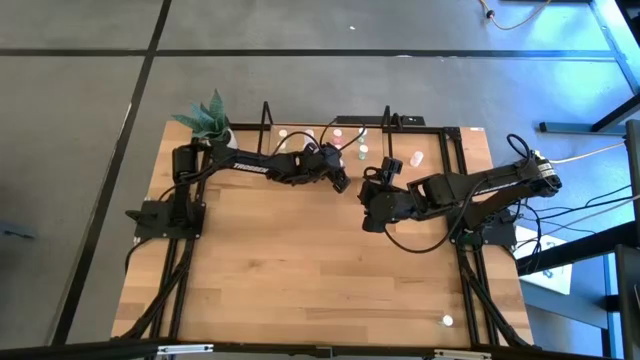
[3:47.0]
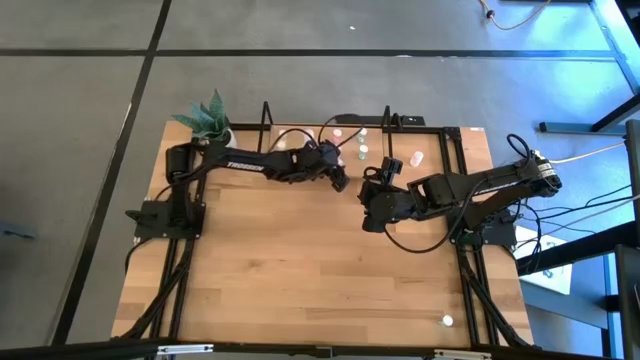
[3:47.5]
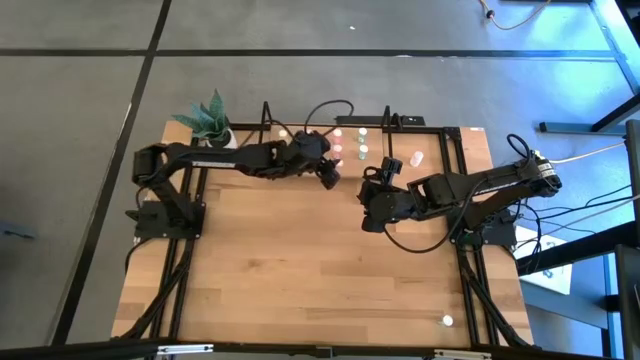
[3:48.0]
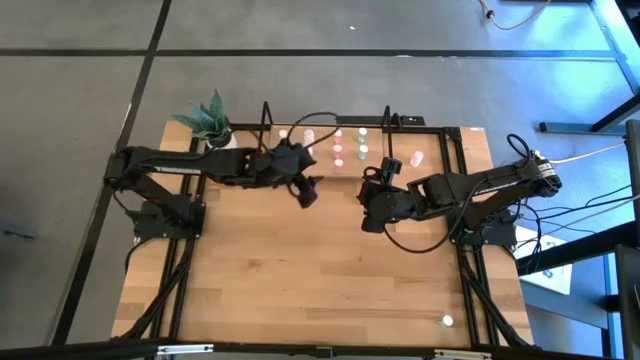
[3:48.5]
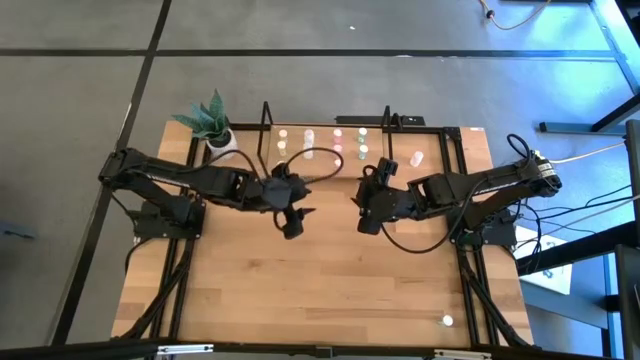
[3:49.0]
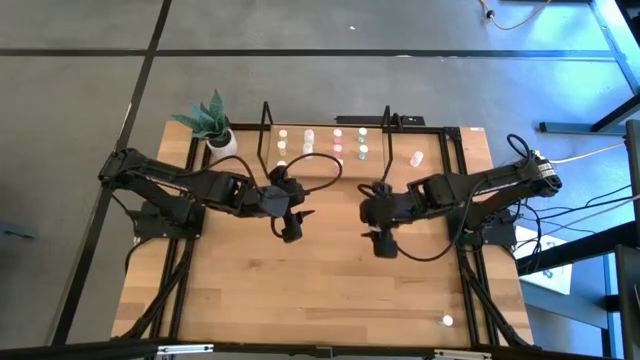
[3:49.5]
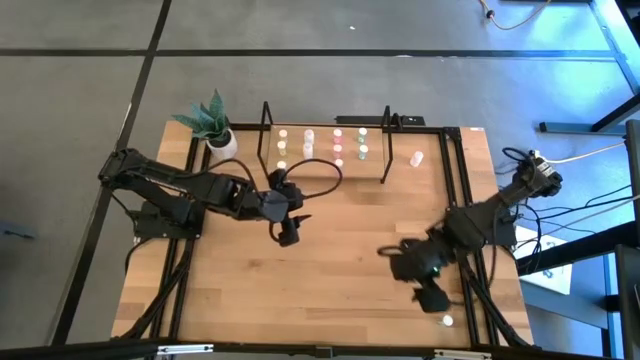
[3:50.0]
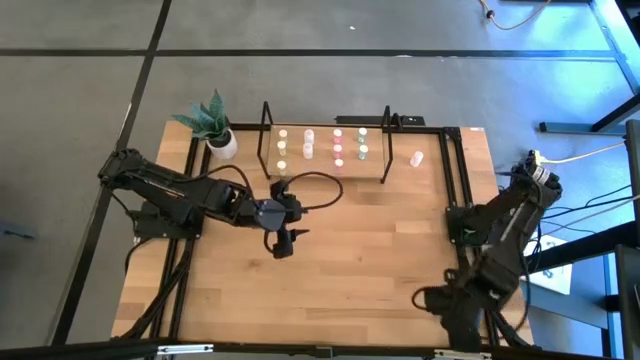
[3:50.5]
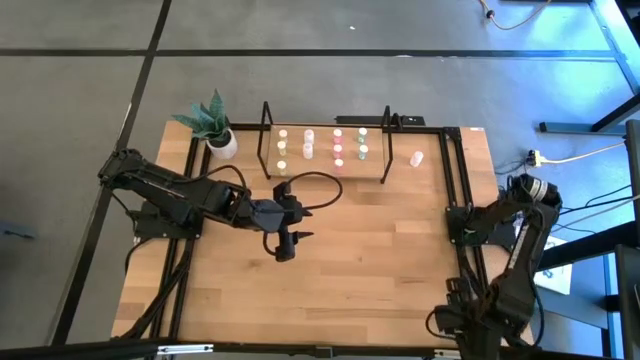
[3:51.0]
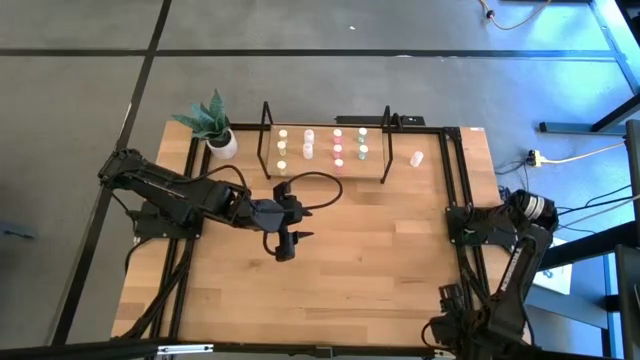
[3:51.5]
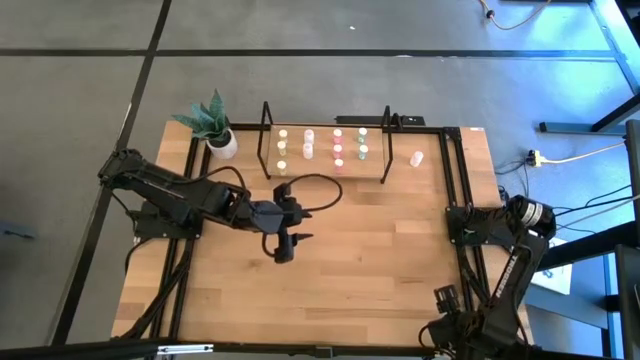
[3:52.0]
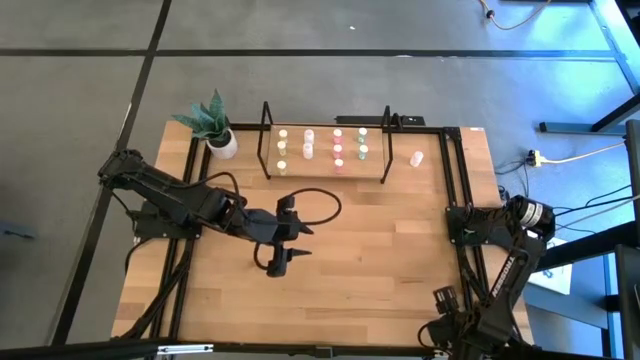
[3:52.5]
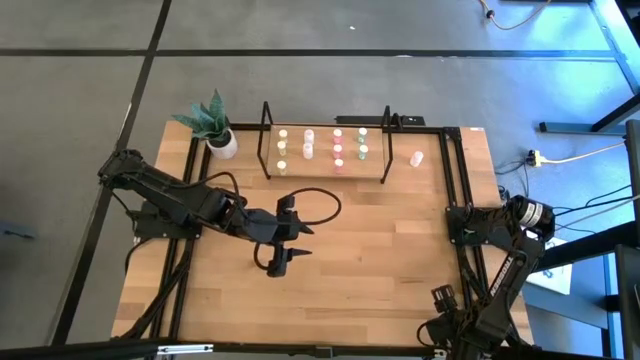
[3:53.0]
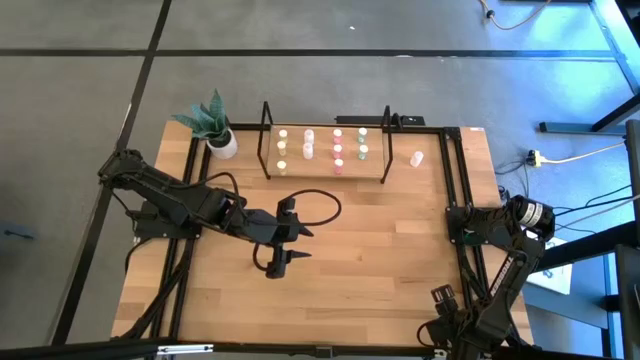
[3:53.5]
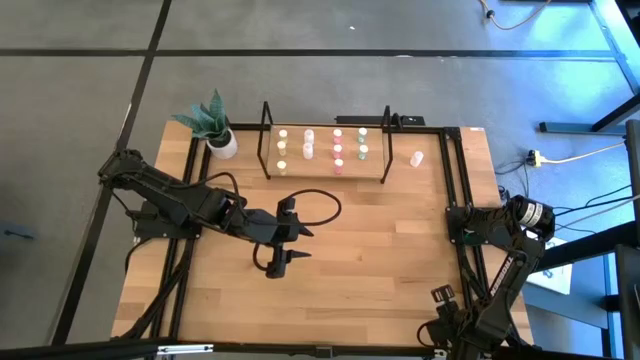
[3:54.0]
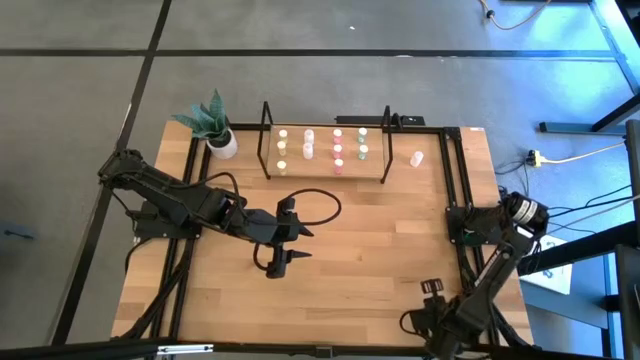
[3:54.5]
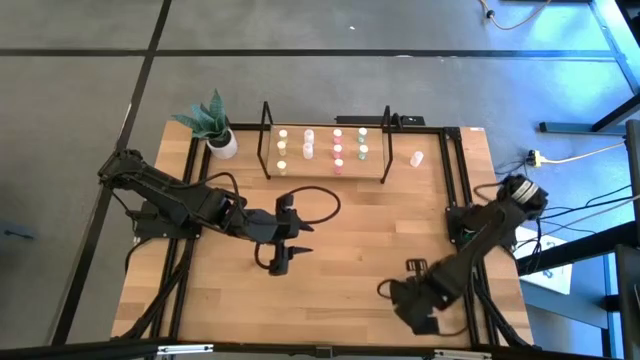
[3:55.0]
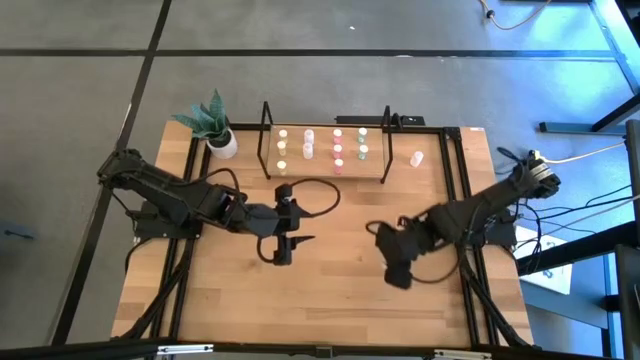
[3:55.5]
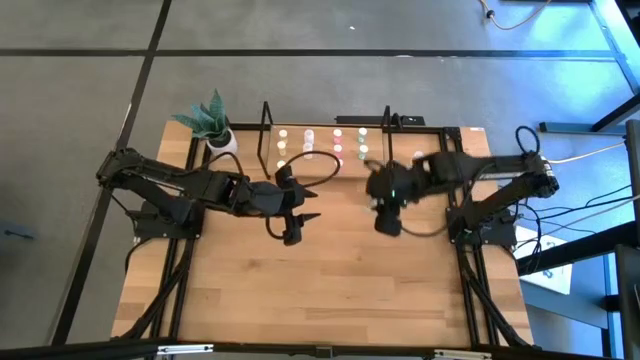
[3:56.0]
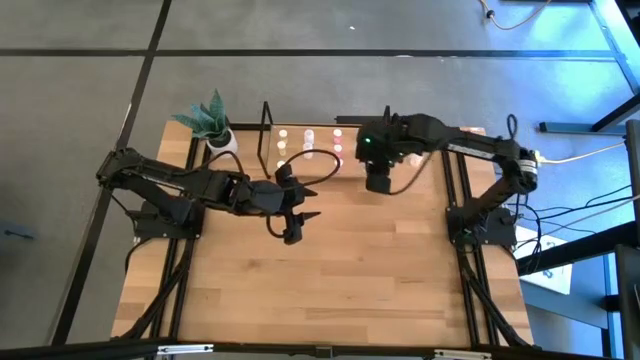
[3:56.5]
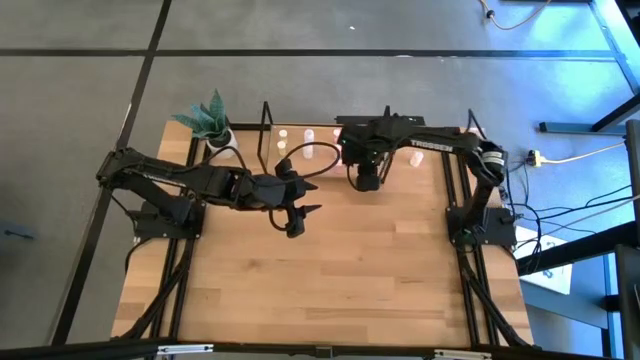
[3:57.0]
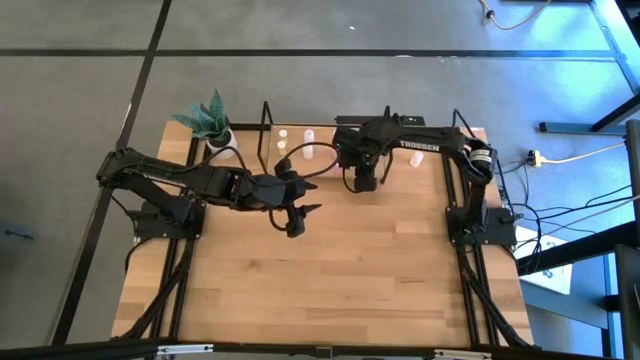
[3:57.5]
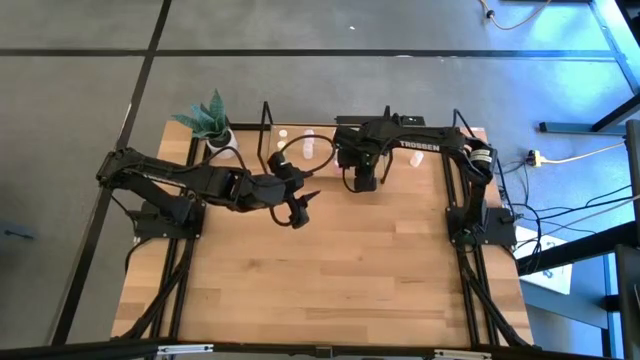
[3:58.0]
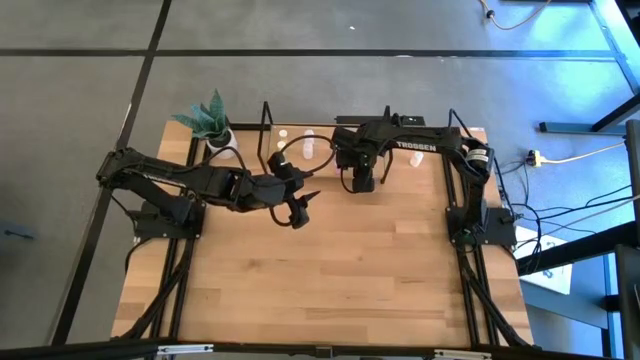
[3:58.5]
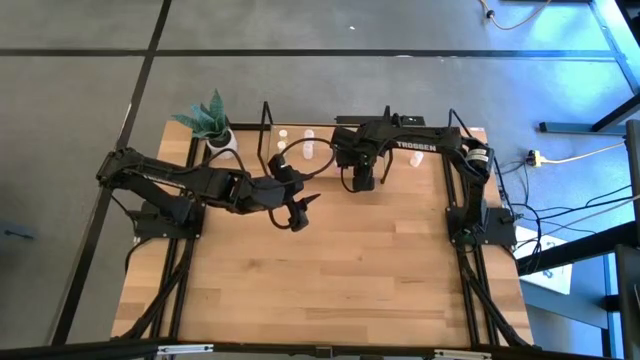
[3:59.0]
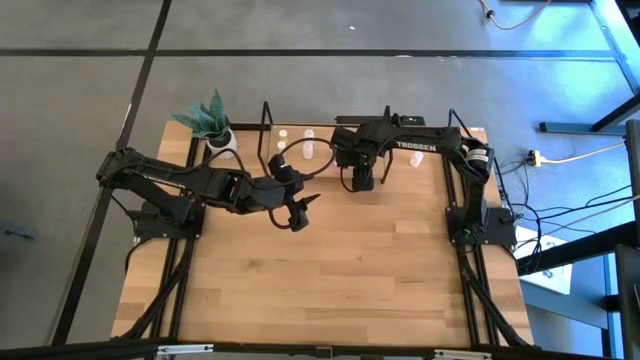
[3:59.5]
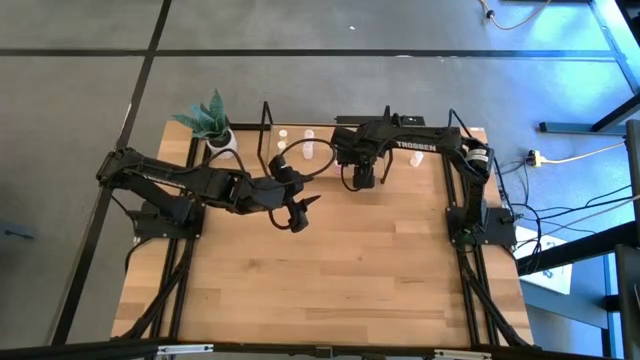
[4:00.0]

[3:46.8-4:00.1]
Task: Pick and place medicine bottles onto shelf by color
Put the blue pill bottle on the shelf aligned with other blue pill bottles

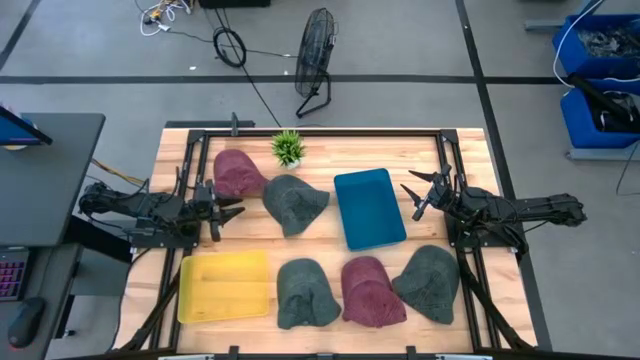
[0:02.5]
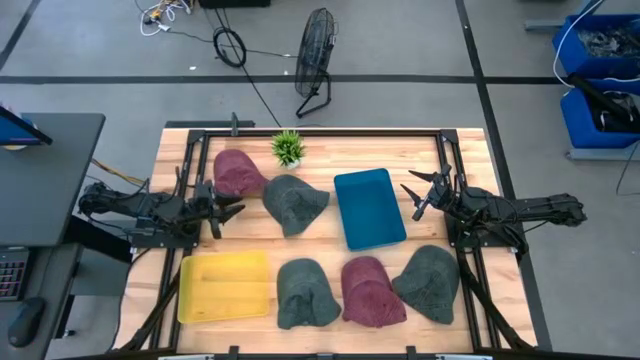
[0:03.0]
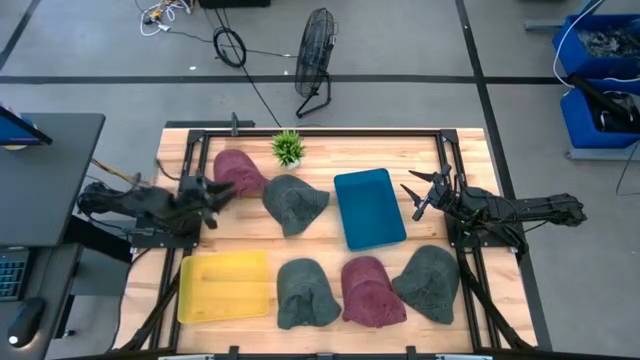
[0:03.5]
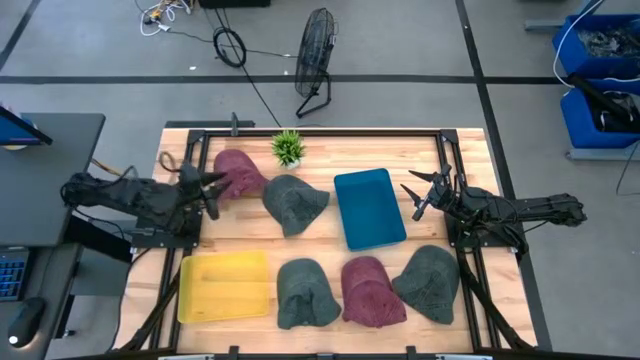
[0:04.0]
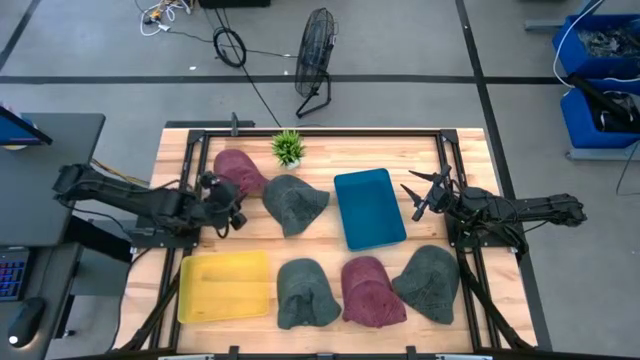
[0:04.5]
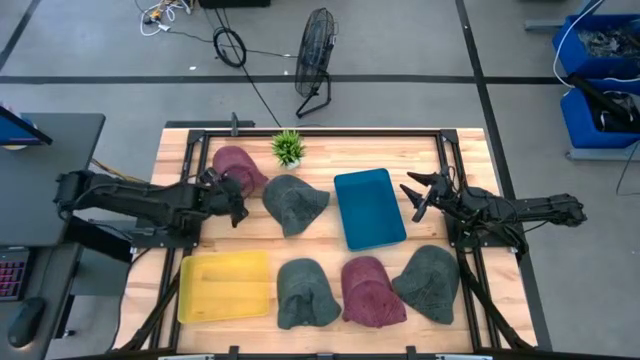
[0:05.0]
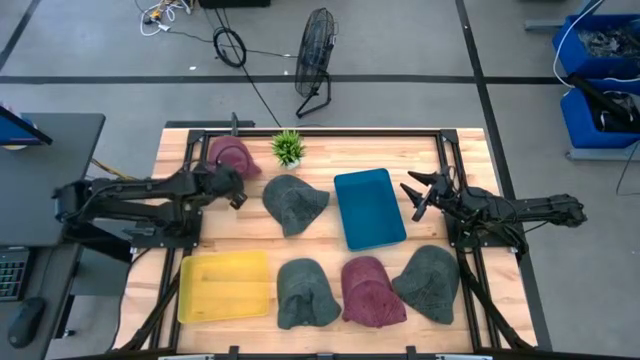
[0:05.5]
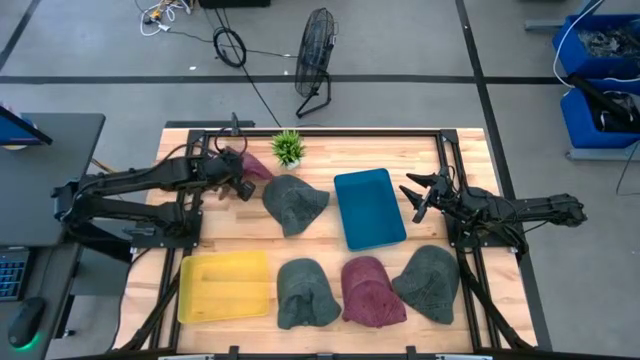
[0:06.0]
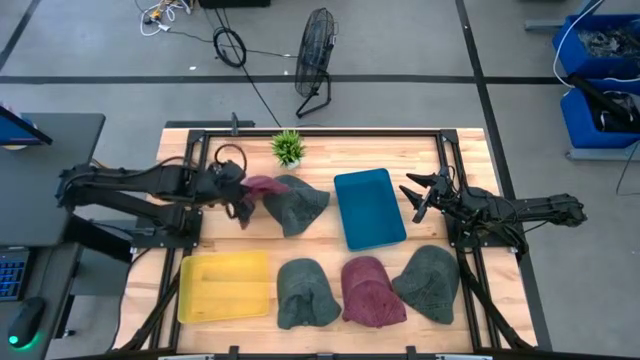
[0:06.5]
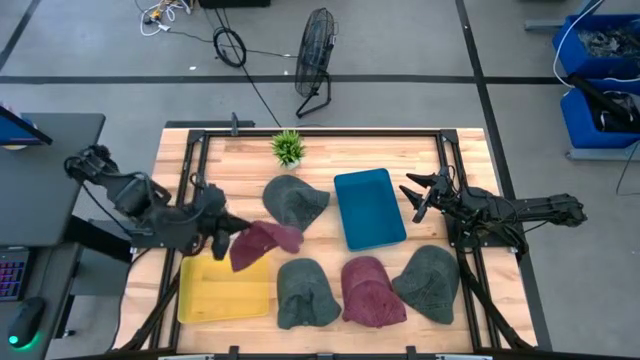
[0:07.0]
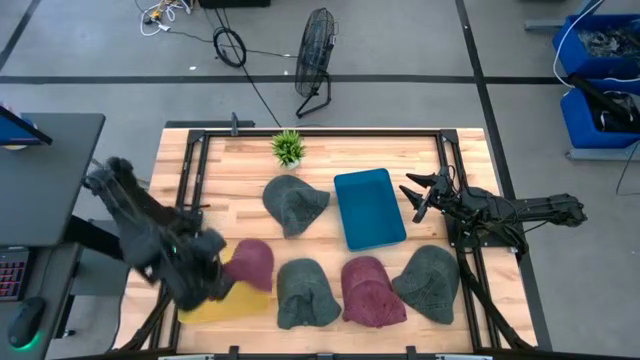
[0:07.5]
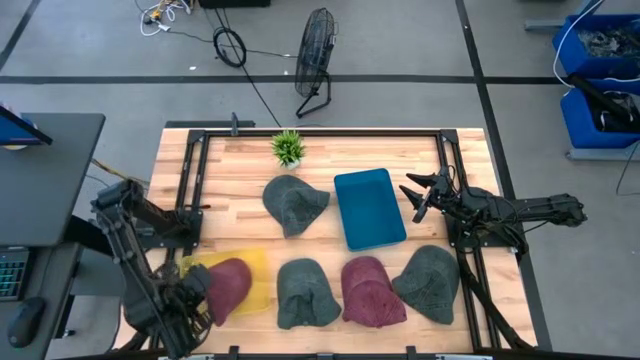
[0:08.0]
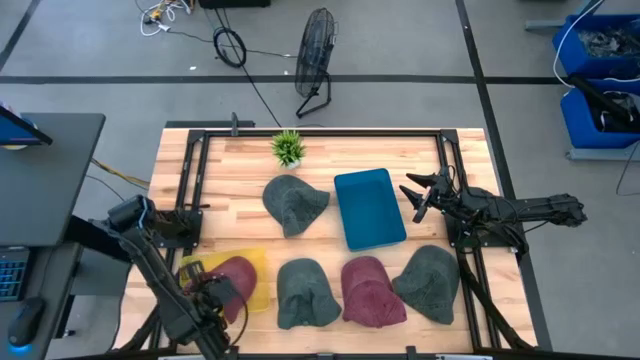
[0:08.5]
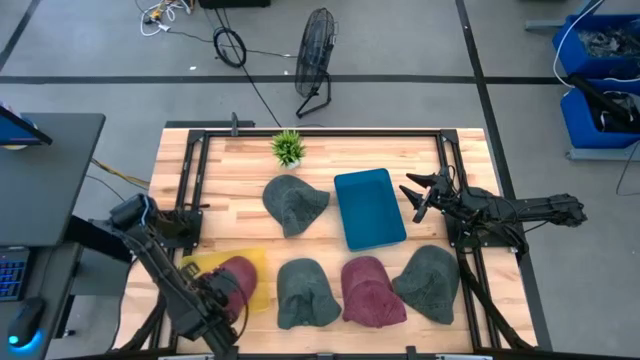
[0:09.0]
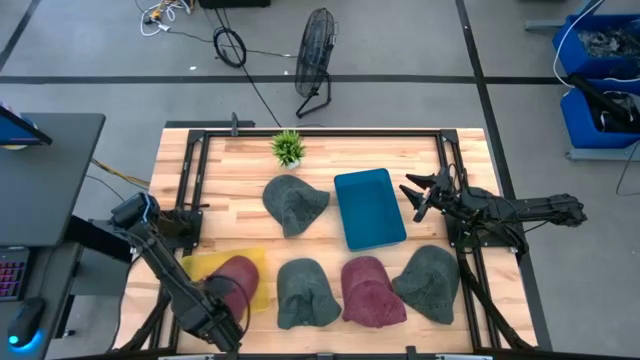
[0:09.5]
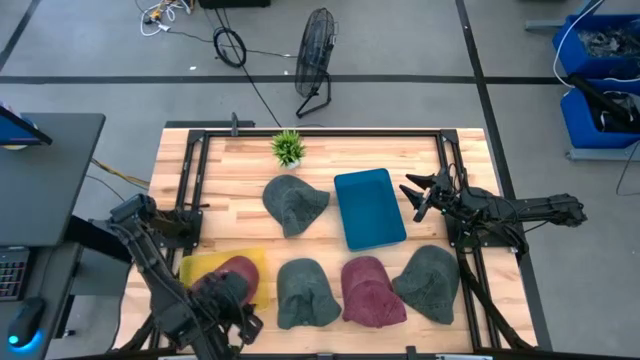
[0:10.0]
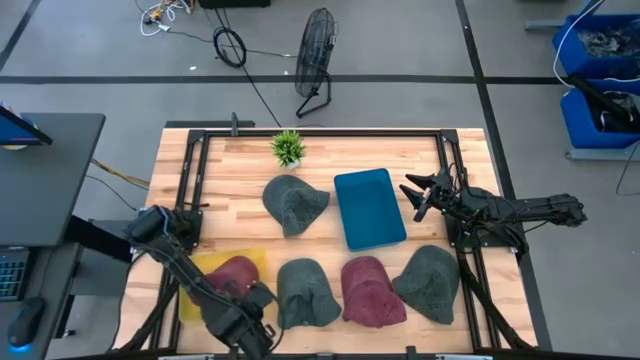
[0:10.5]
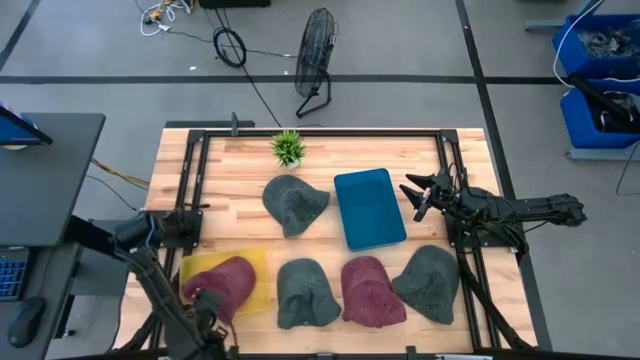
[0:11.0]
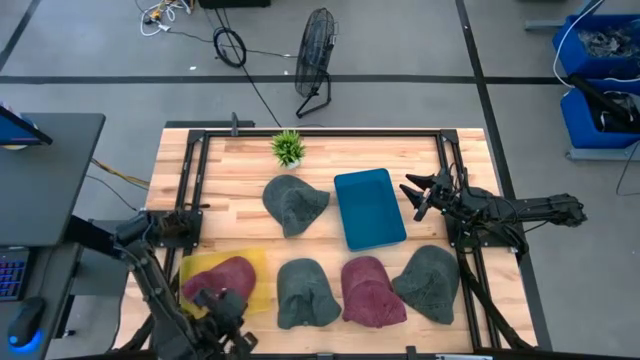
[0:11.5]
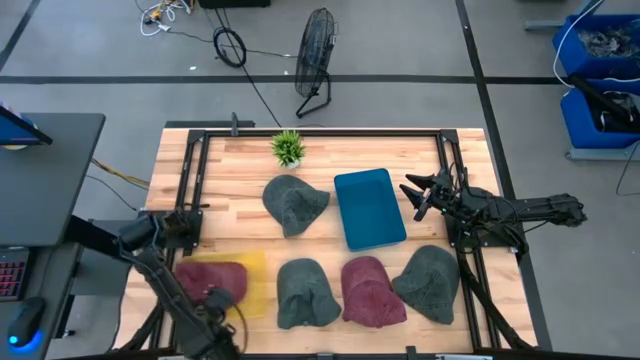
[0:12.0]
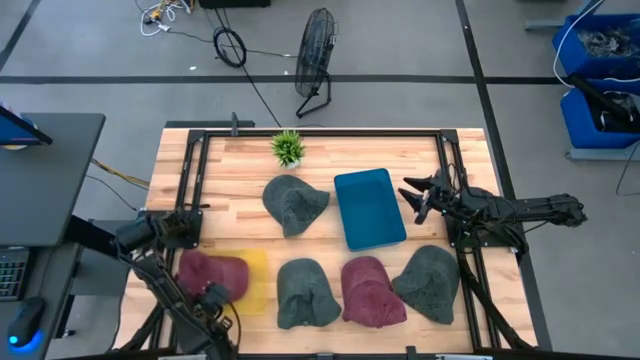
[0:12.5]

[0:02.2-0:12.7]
Task: Pick & Place hat
Put the top red cap into the yellow bin
